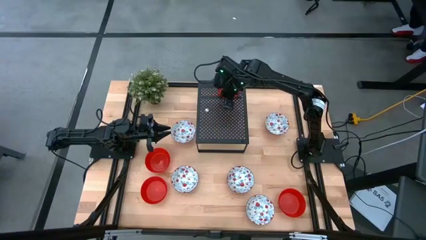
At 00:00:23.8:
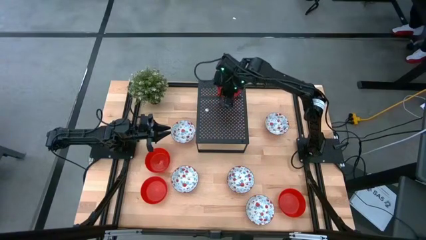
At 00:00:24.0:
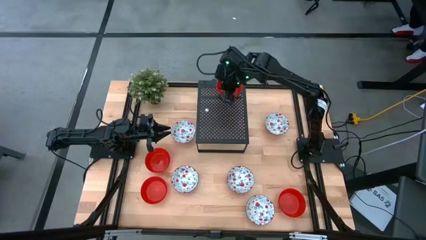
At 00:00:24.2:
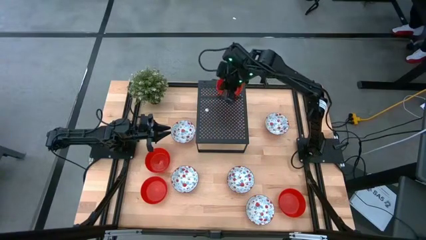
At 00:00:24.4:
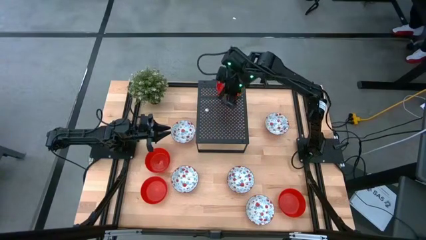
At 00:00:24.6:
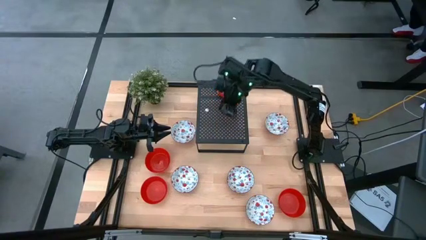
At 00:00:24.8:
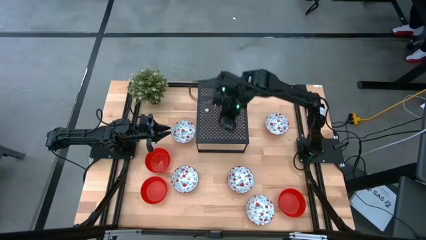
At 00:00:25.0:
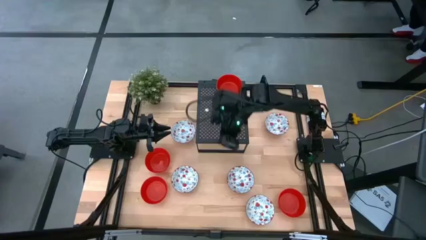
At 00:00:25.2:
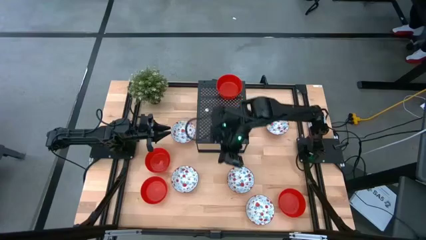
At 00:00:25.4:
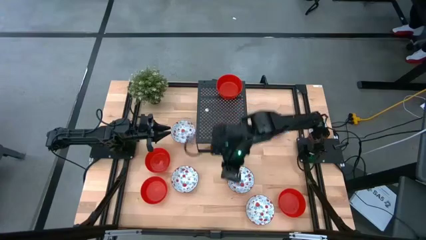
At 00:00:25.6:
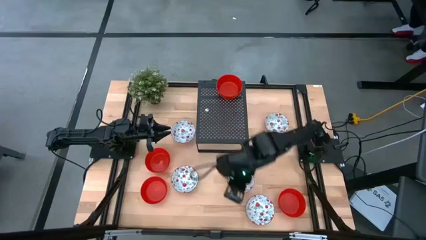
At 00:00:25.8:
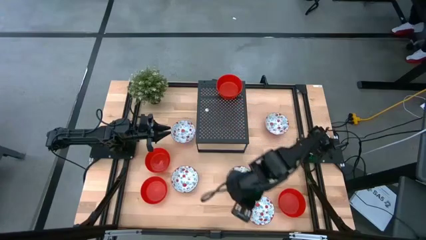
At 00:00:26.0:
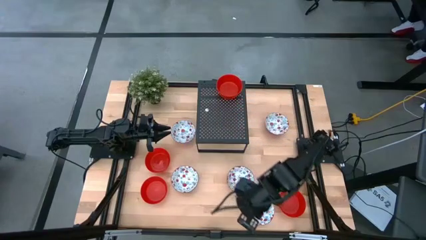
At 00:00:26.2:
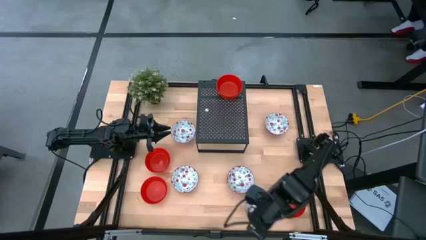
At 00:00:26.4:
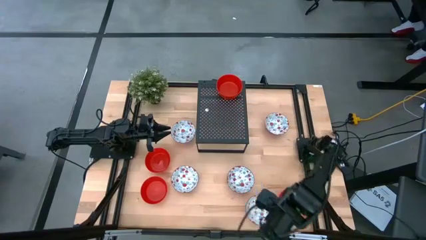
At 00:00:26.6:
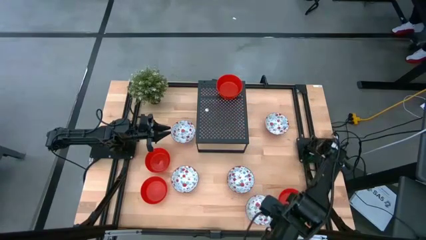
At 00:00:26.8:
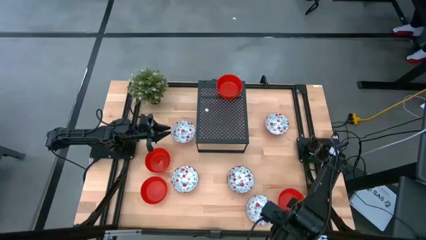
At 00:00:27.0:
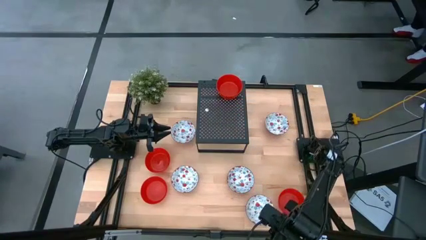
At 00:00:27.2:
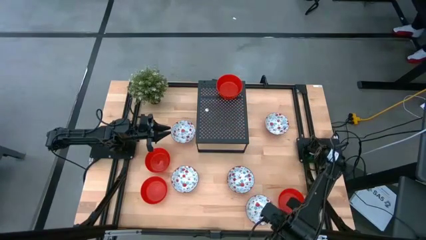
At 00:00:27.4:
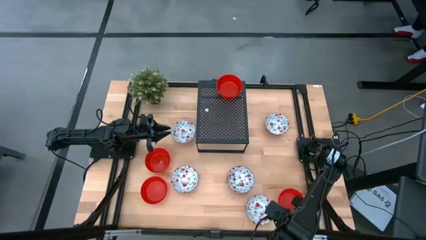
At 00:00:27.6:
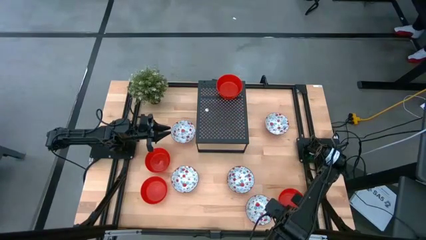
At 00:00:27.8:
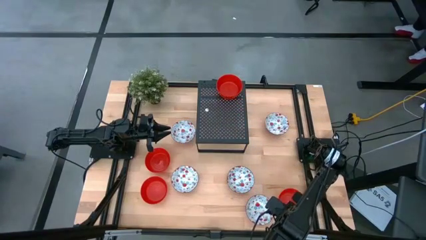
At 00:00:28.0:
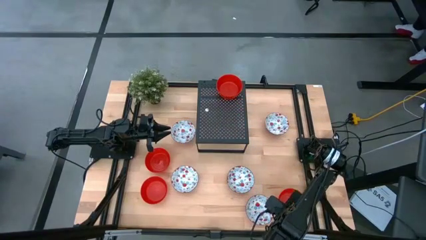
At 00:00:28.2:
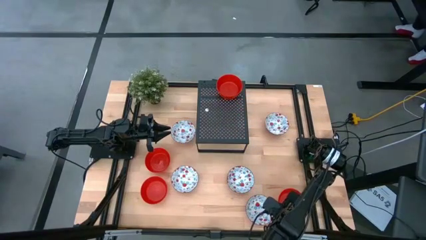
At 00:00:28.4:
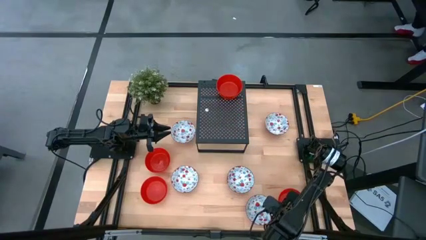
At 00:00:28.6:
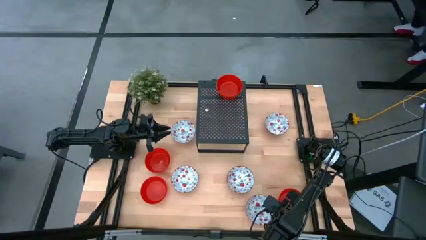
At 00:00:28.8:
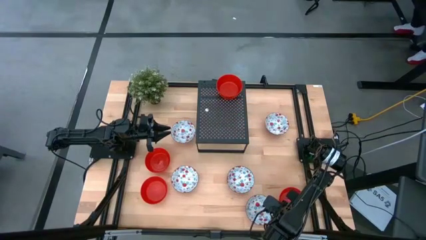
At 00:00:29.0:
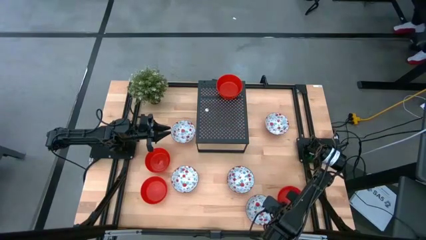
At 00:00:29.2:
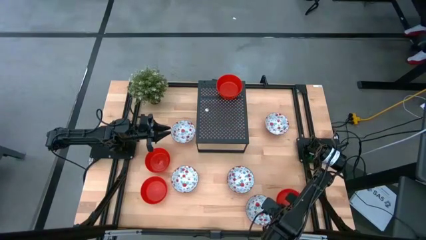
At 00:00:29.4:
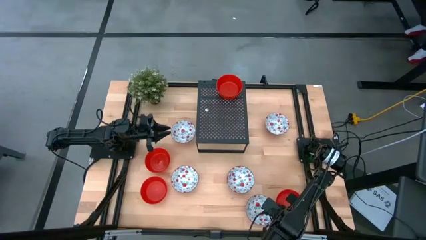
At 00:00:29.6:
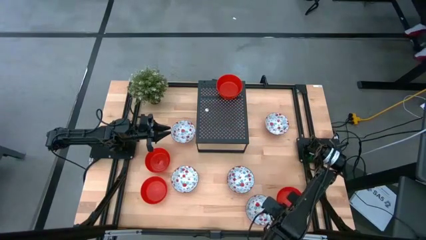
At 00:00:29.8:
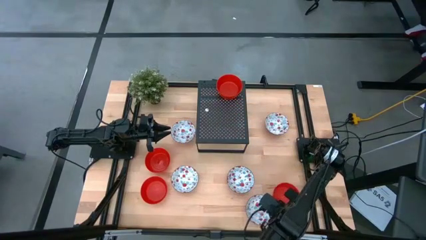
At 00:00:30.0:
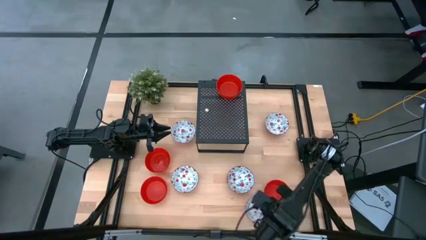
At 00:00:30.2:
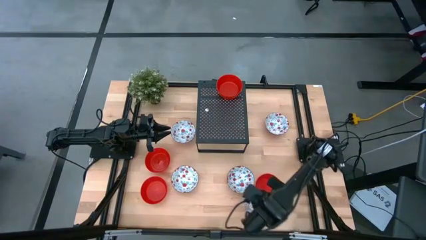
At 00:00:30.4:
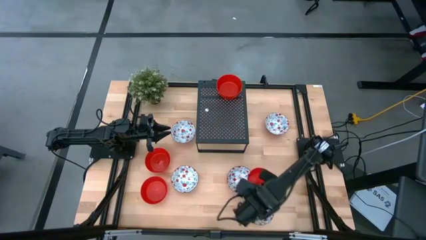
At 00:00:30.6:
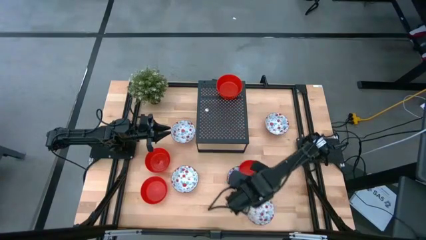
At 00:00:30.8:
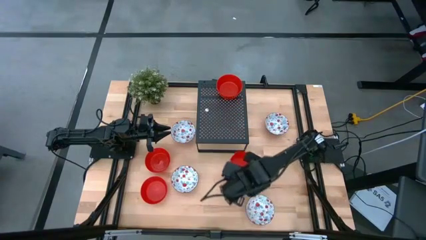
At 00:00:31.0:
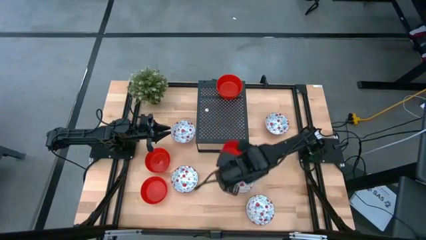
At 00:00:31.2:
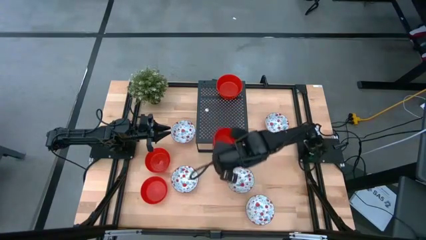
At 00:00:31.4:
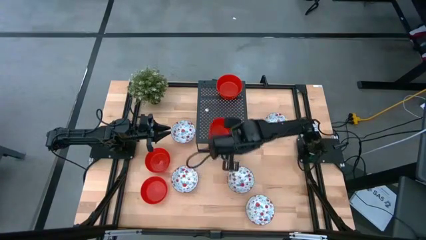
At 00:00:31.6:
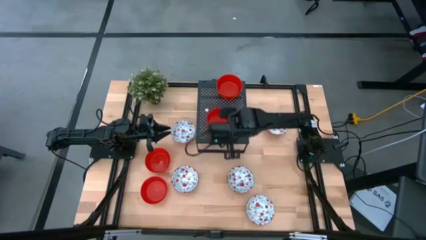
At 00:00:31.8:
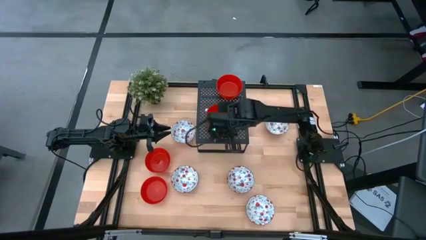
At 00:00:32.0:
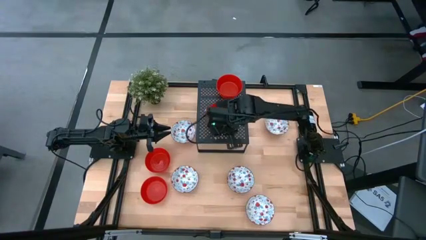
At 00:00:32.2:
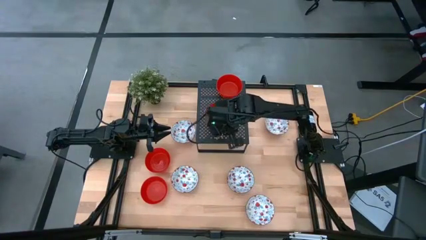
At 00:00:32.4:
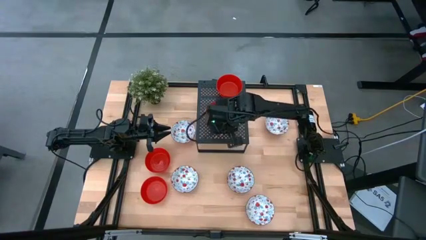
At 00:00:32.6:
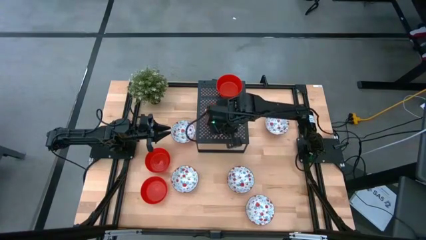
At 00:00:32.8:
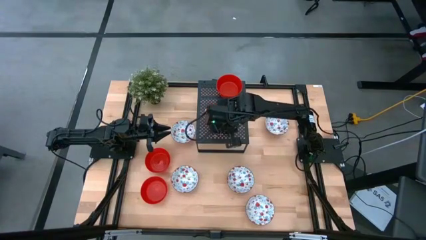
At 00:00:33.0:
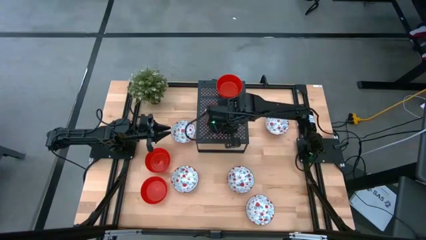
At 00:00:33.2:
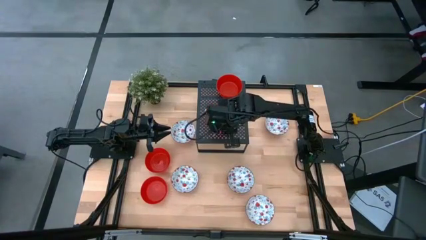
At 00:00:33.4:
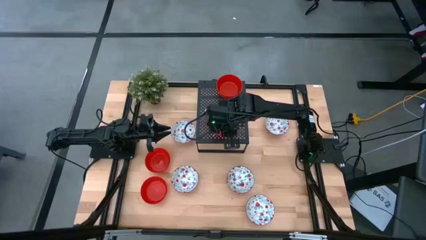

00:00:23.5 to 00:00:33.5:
Task: Pick & Place Mini bowls
Put the bottom right red bowl on the bottom of the shelf
